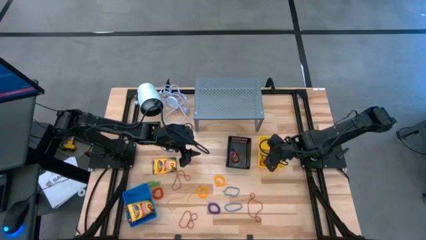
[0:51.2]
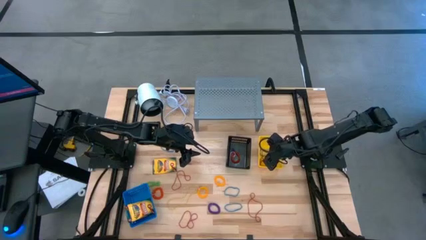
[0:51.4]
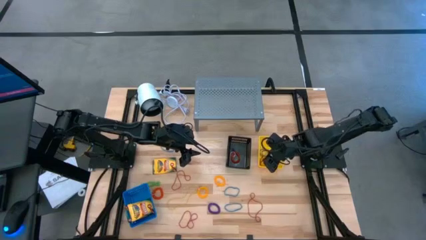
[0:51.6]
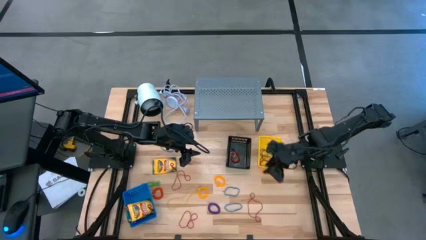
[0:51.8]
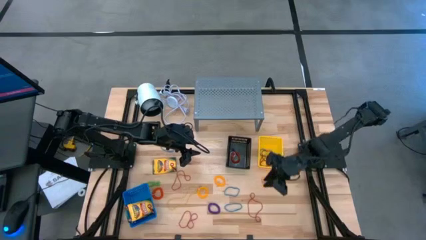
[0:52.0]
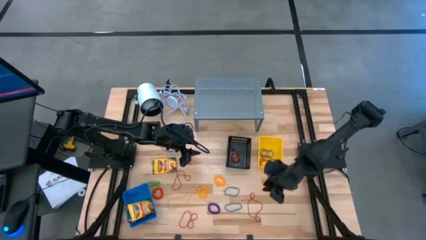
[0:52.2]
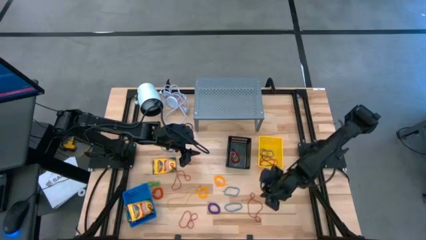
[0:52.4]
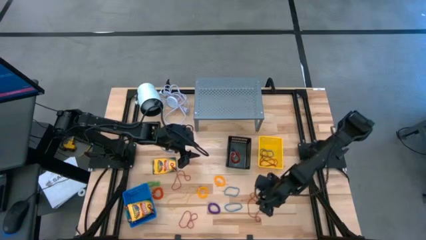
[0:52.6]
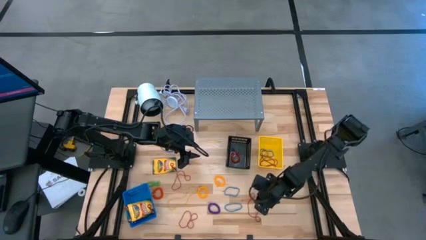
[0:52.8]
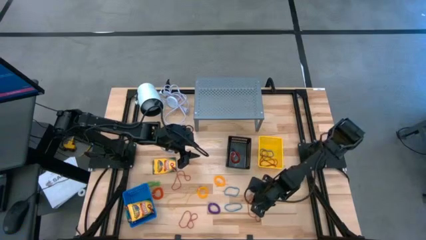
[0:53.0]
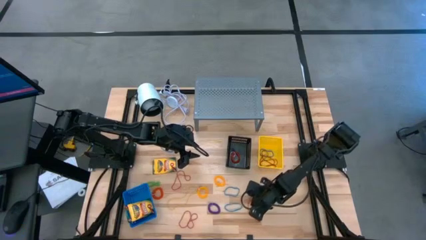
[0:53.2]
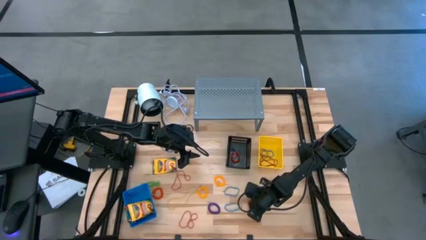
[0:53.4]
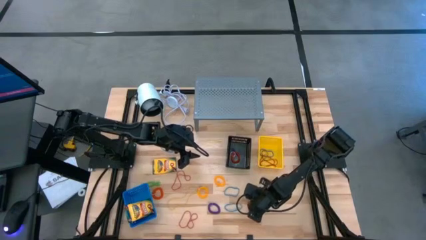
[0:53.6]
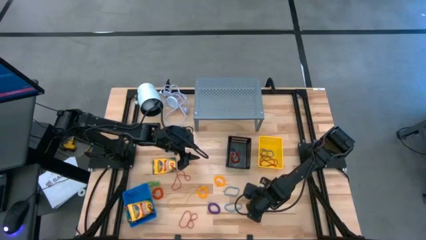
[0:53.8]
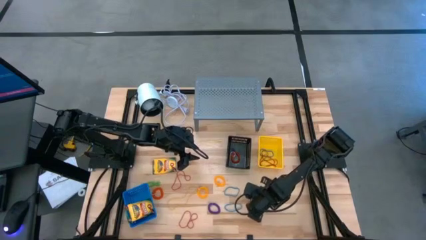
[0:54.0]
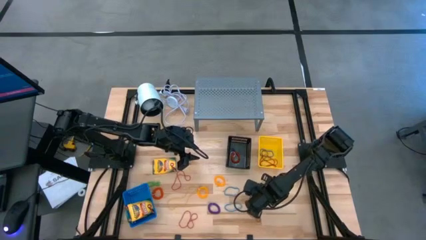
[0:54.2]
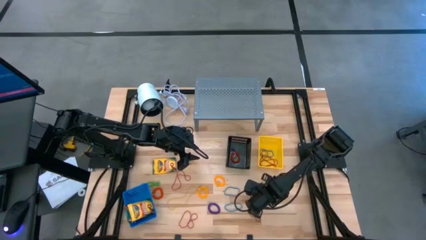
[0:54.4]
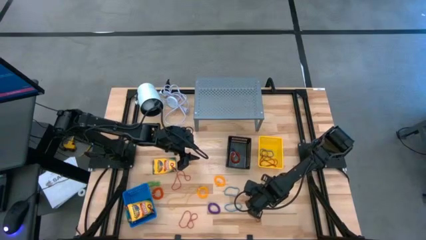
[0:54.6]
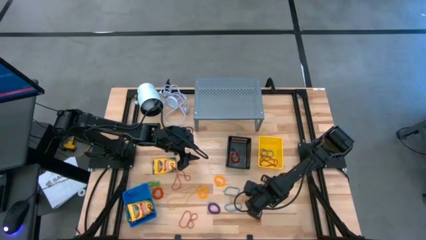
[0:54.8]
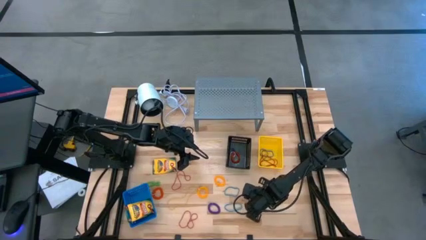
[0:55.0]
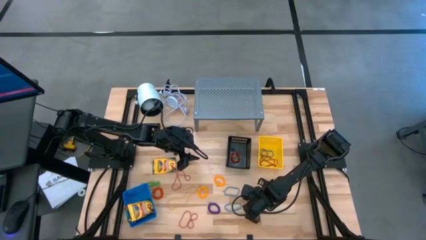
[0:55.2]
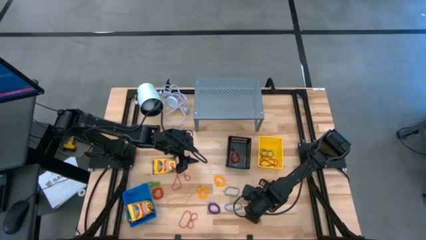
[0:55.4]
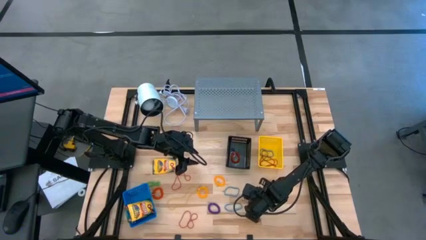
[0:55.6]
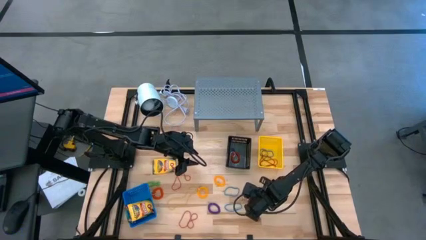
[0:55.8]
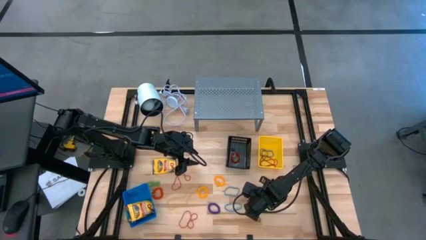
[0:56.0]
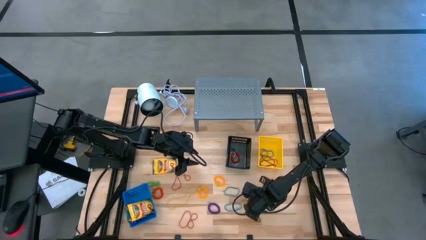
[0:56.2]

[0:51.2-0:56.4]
Task: Pick & Place Office Desk Supplies
Put the red rubber band into the yellow basket

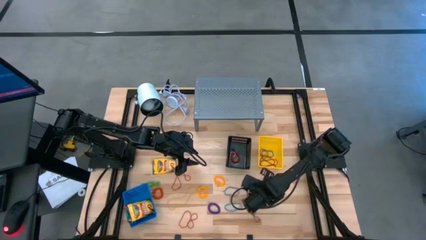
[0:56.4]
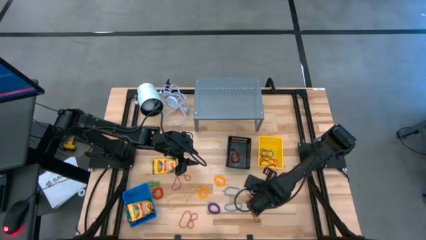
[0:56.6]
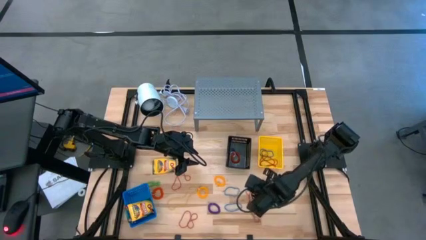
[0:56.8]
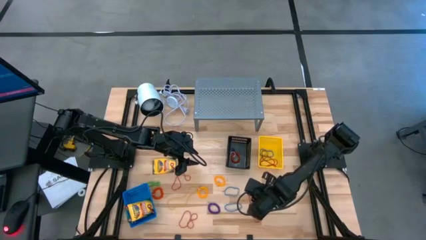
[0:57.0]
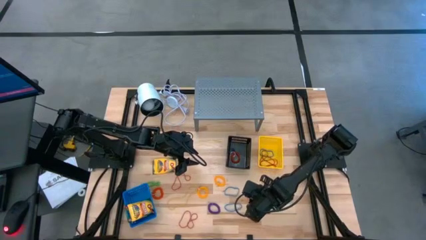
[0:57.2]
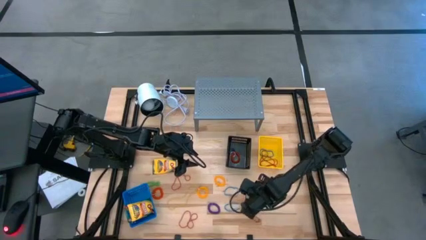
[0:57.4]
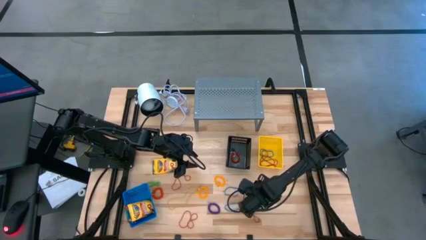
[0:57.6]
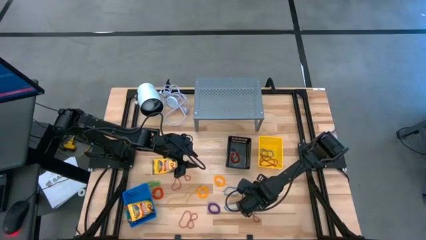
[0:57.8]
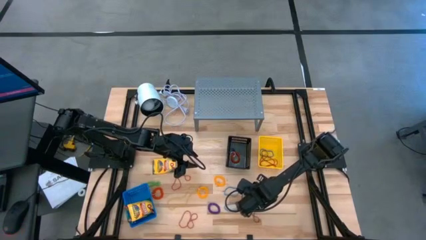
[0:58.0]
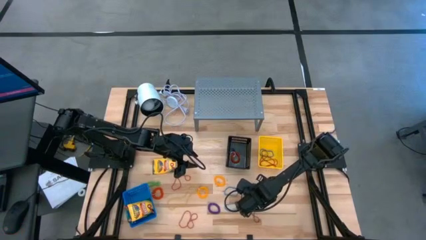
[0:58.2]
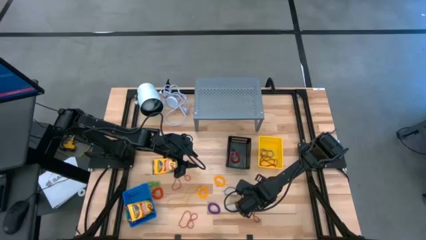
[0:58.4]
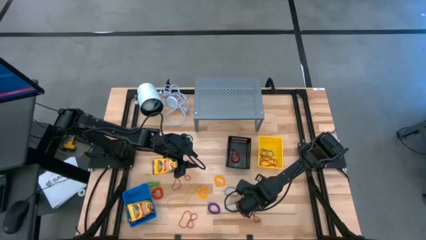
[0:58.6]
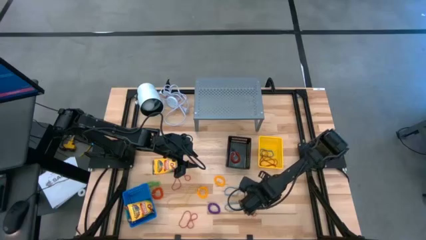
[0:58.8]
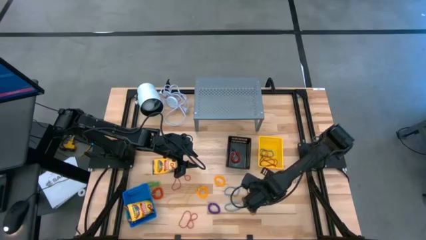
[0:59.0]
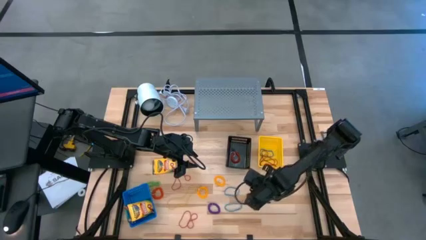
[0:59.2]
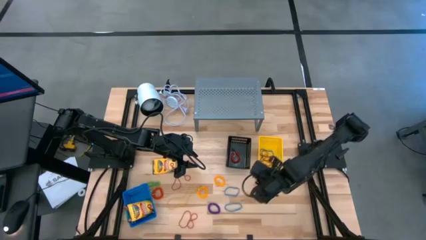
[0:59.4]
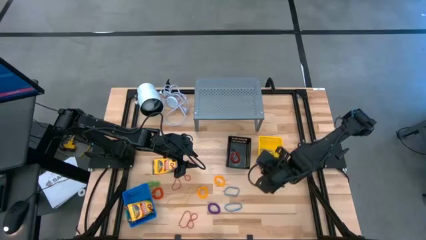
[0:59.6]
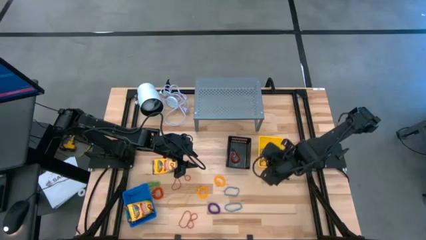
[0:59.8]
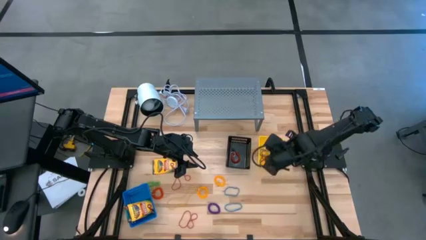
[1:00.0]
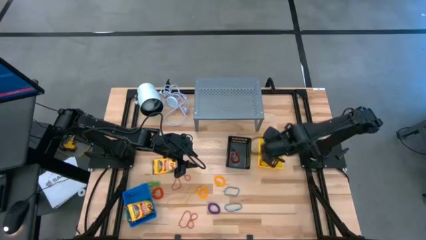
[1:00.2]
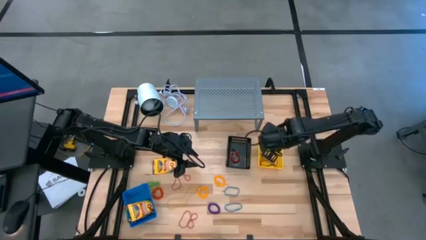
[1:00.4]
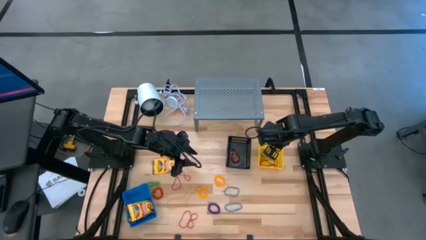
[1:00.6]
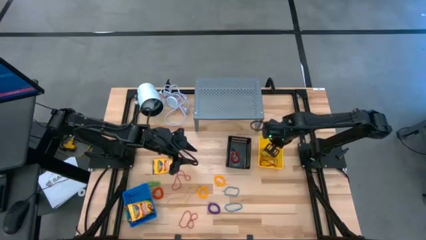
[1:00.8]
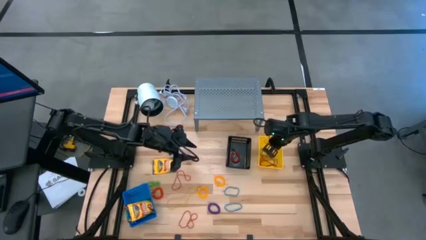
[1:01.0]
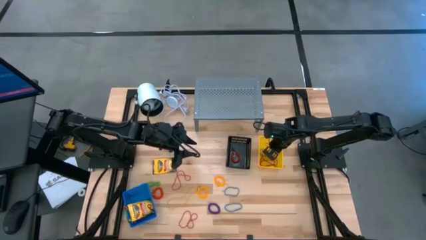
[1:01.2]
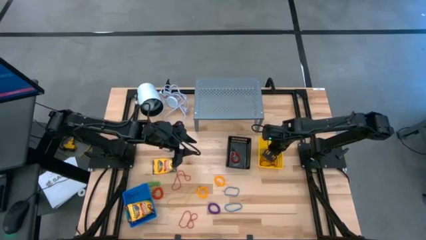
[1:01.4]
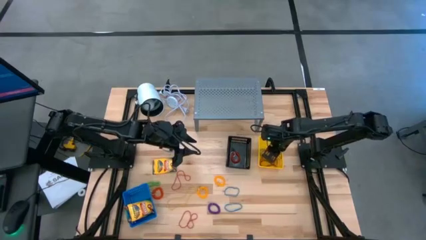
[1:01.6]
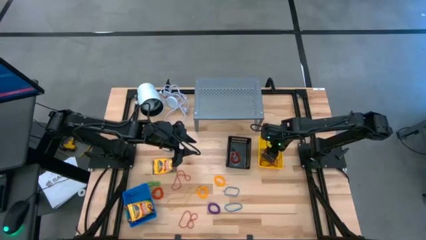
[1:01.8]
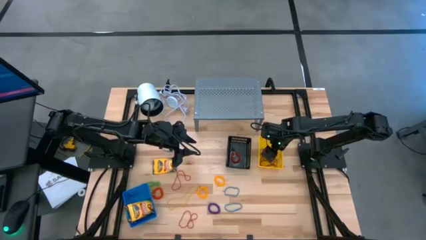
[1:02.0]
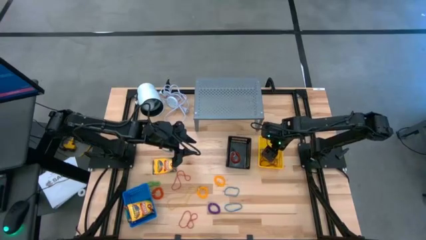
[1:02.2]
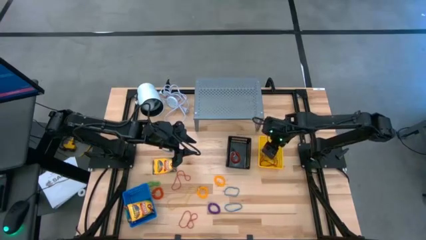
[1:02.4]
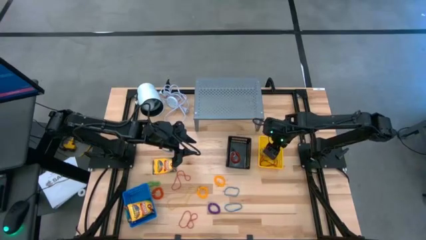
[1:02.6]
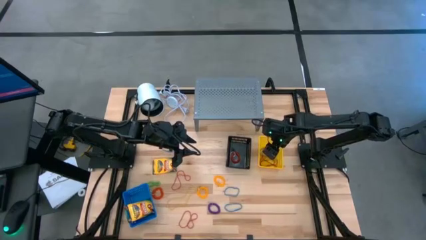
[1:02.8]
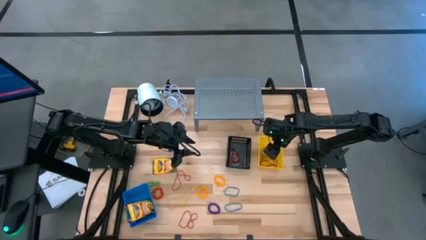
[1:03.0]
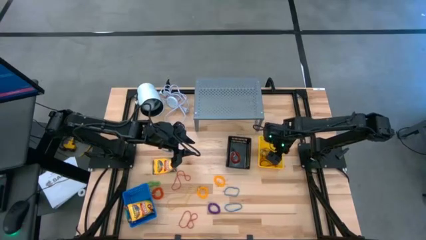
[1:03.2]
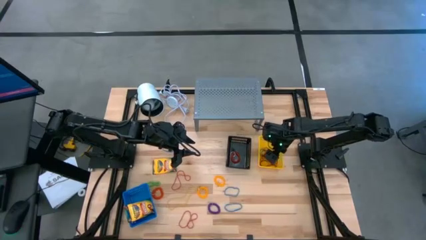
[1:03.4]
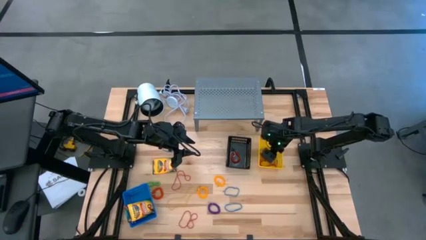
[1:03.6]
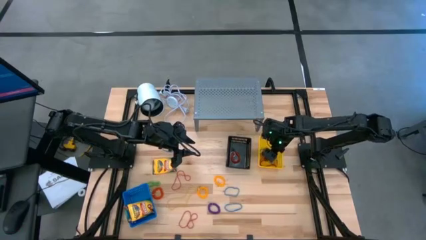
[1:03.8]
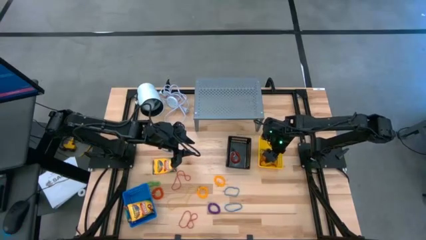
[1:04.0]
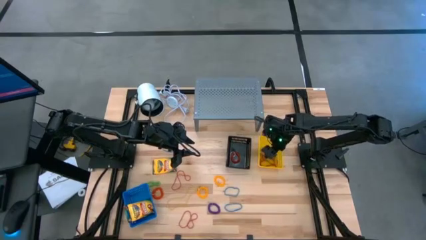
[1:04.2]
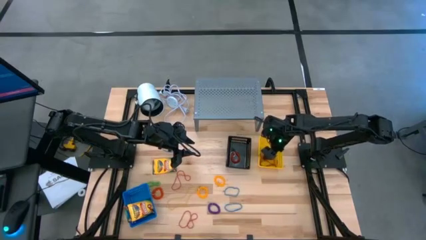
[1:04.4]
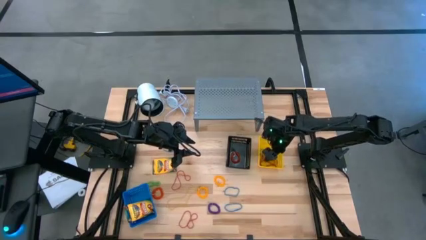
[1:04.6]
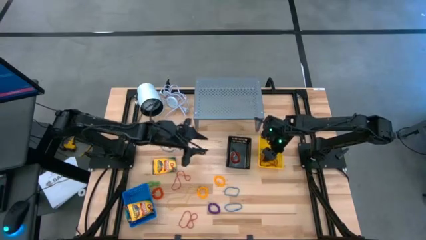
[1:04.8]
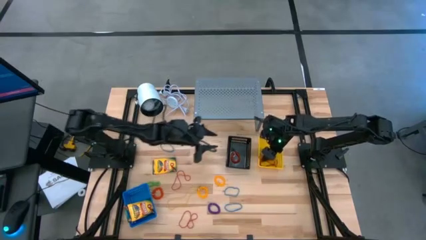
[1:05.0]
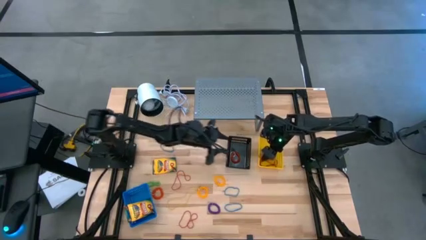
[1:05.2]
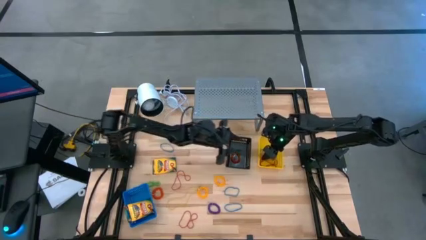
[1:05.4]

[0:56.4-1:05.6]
Put the red rubber band into the yellow basket
